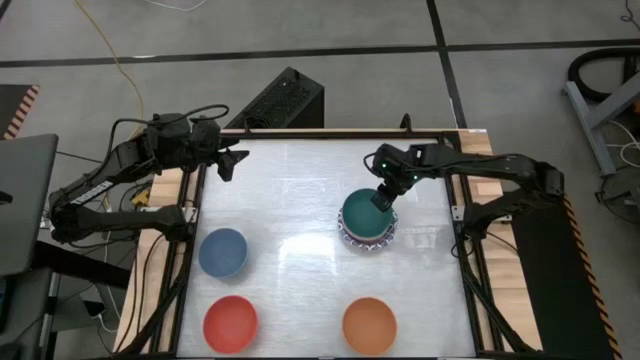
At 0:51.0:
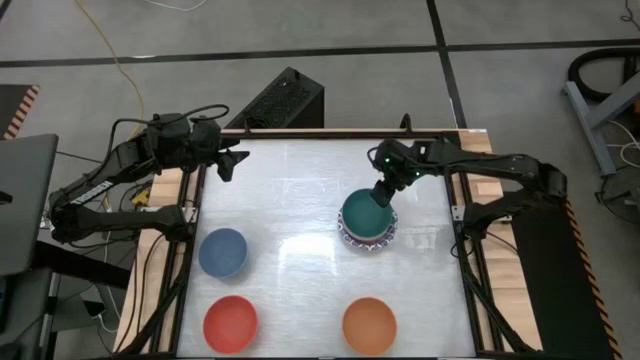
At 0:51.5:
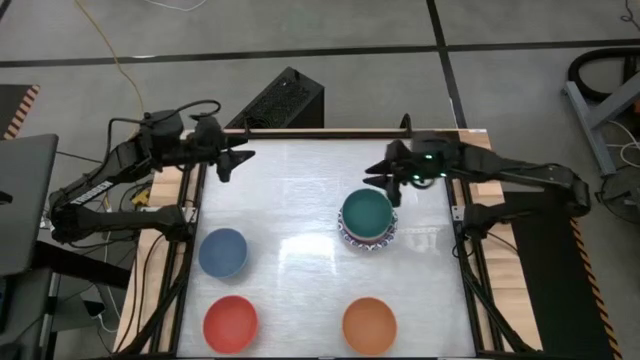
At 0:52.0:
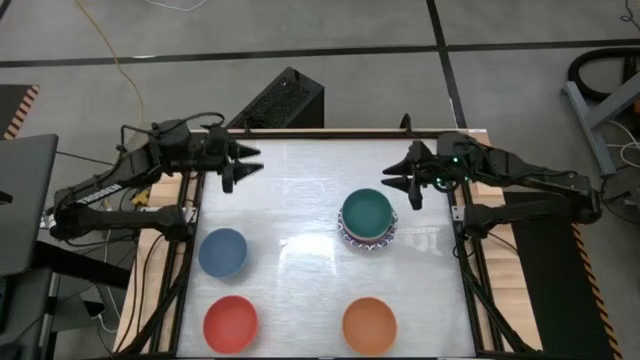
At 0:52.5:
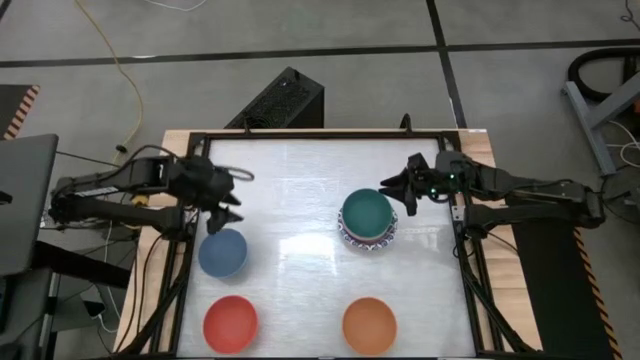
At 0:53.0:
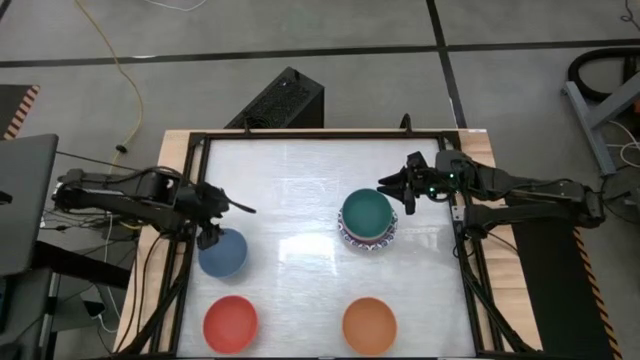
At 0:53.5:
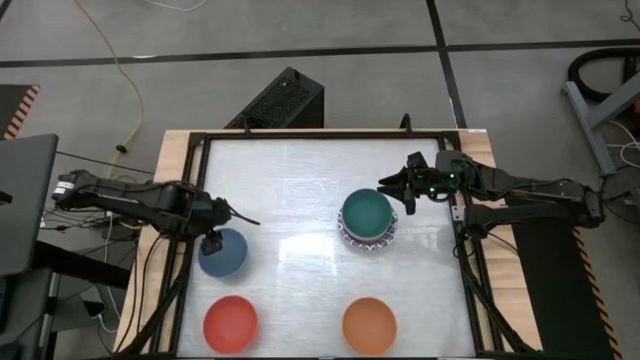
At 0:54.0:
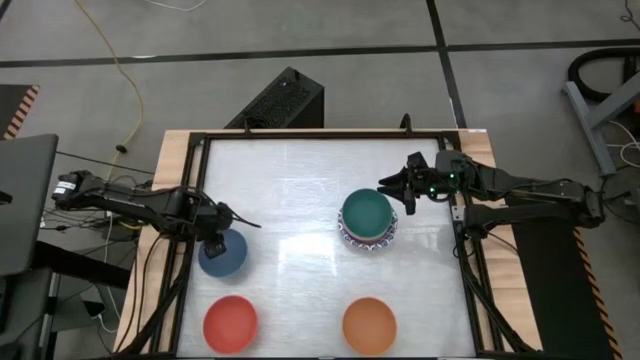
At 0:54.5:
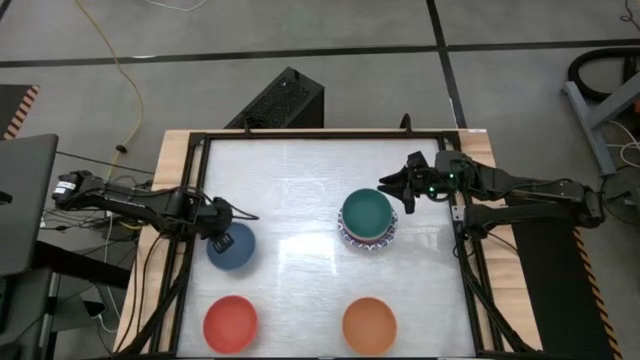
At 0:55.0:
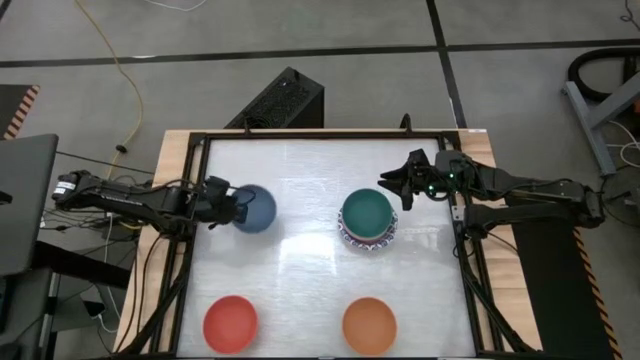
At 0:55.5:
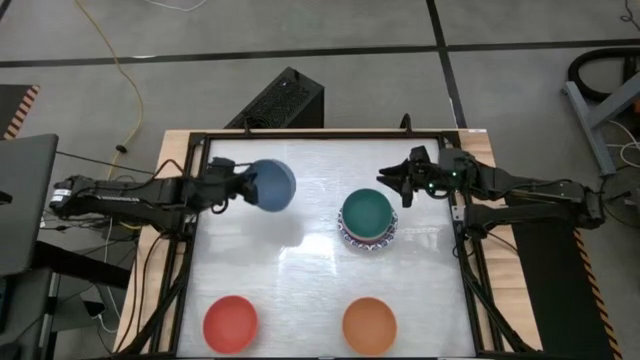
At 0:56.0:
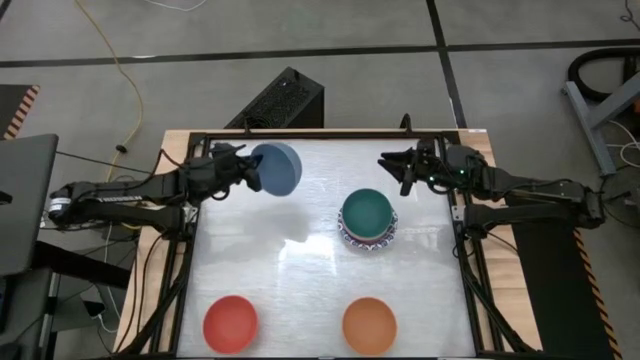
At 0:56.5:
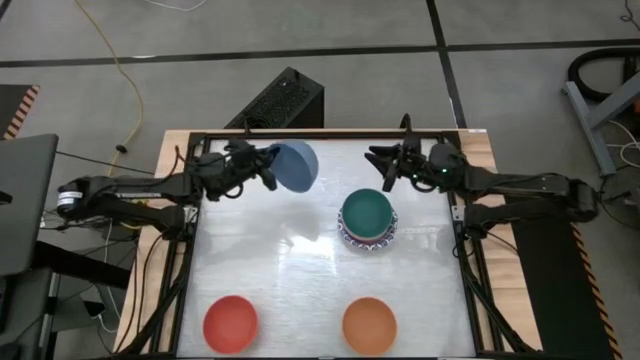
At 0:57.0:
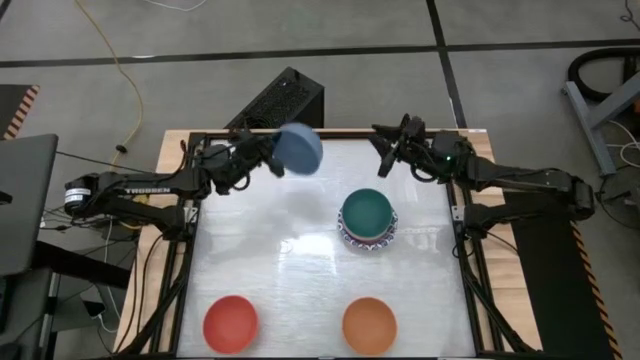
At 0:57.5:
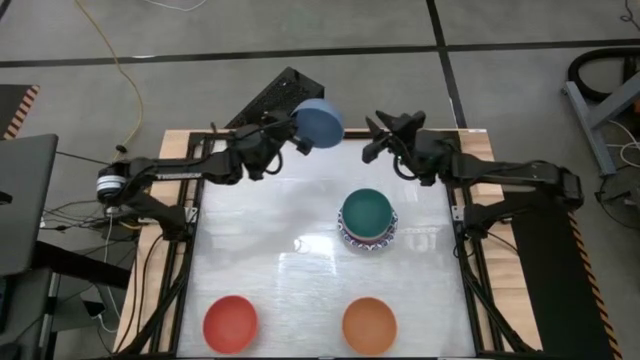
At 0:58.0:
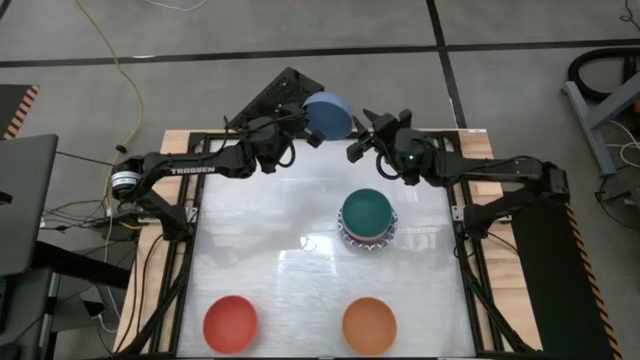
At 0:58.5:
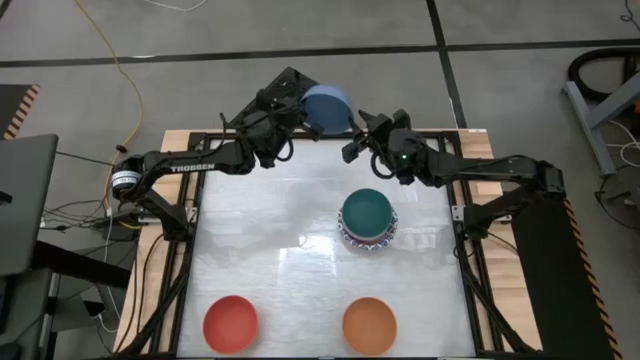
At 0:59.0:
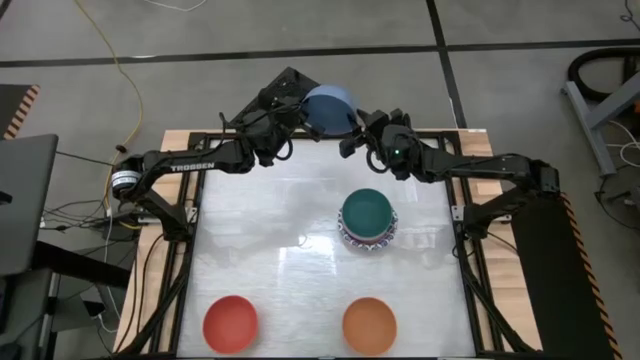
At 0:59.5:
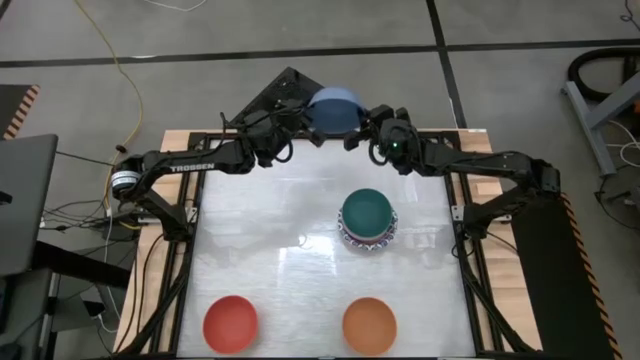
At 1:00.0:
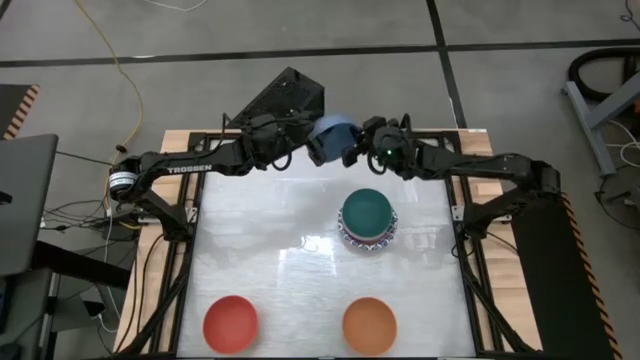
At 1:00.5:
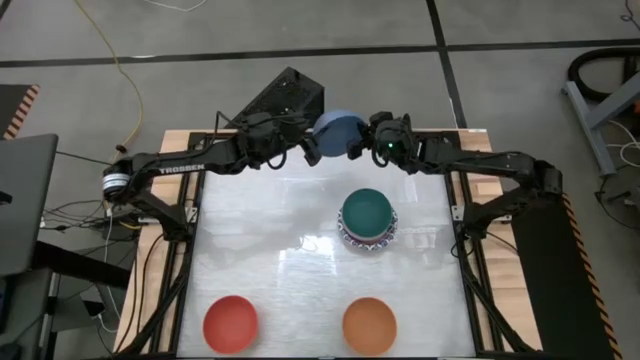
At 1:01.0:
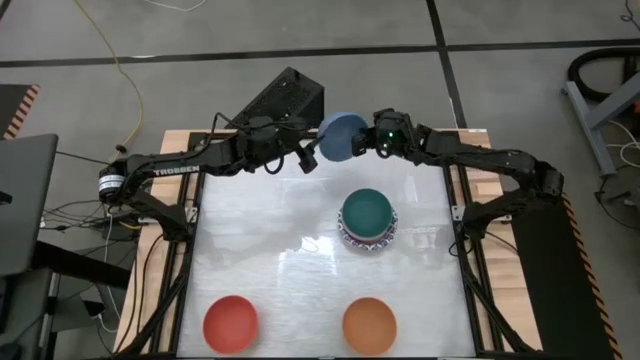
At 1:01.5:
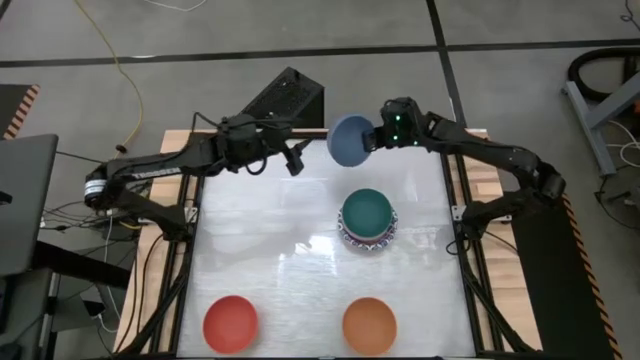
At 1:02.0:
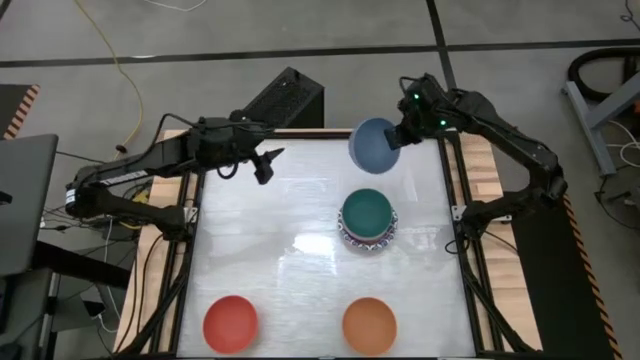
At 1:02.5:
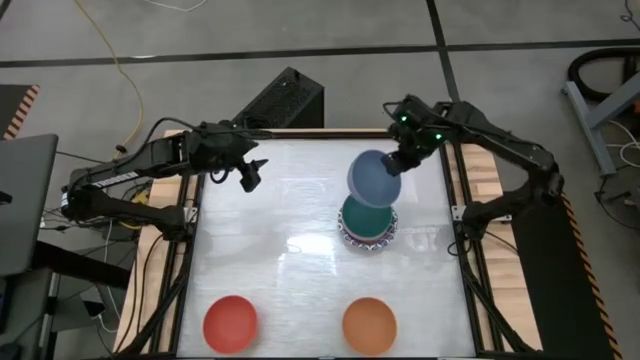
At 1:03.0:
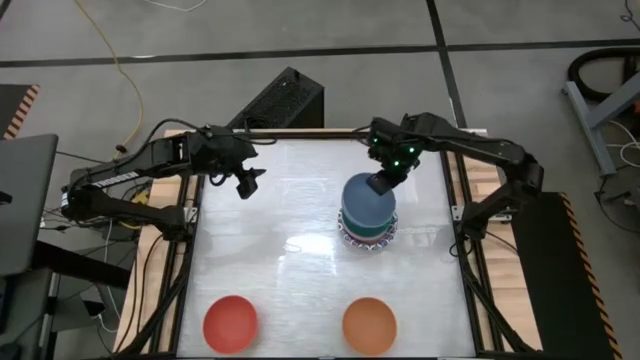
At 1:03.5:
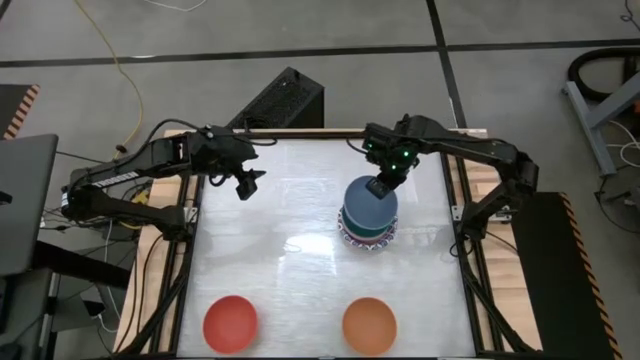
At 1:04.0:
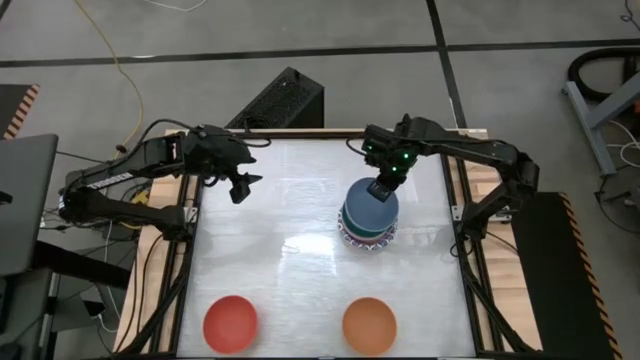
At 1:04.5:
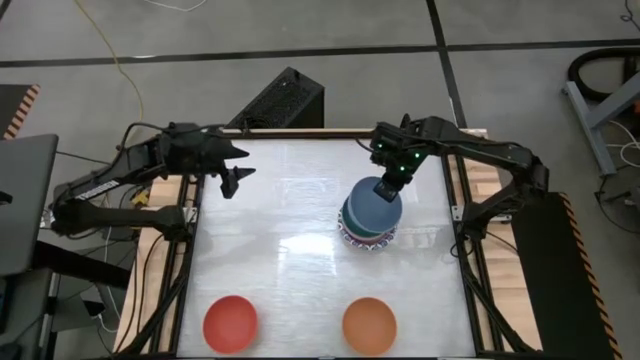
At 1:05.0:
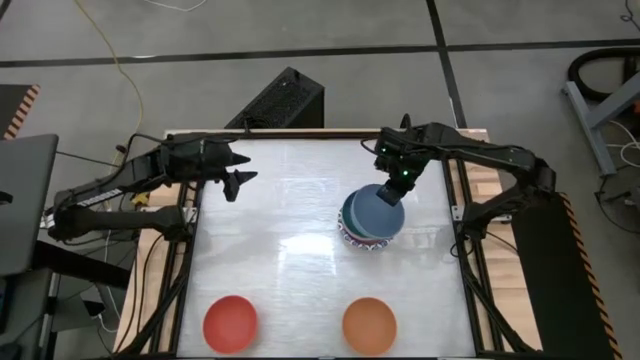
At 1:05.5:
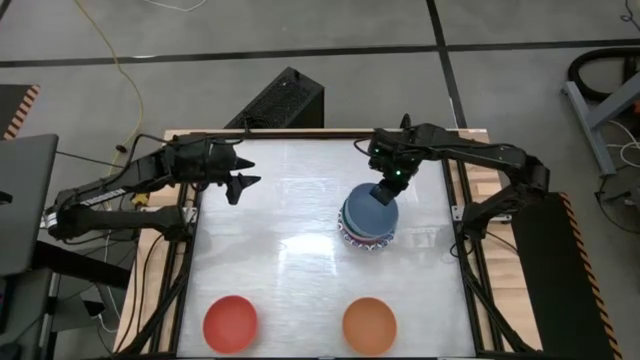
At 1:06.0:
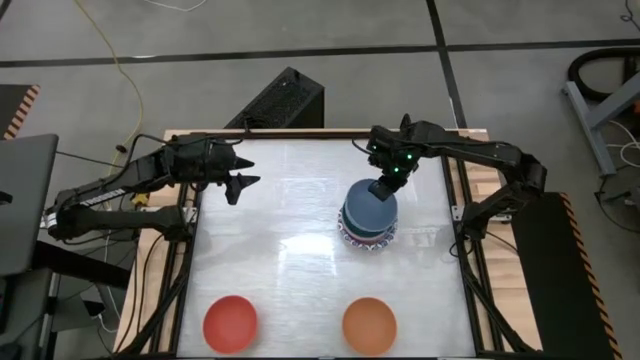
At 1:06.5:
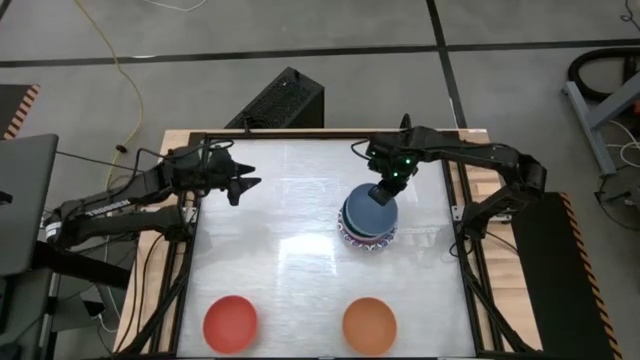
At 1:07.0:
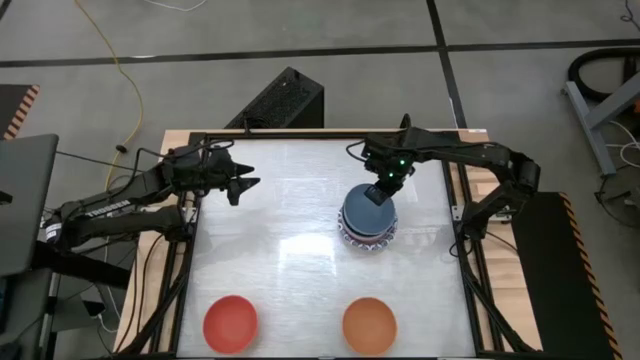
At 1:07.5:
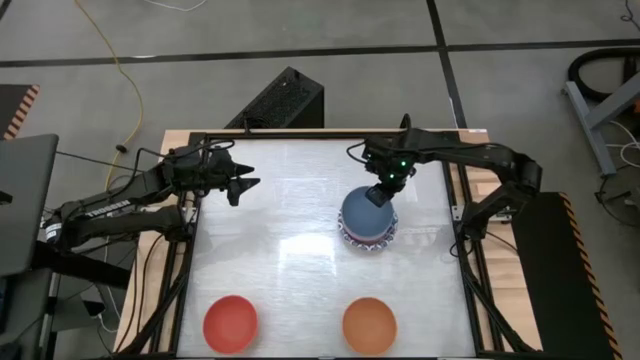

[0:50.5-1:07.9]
Stack the blue bowl on top of the dark green bowl
